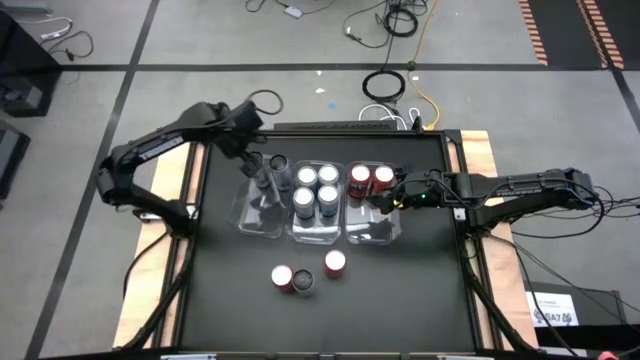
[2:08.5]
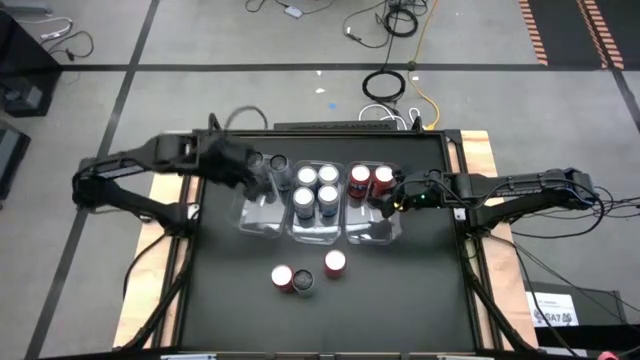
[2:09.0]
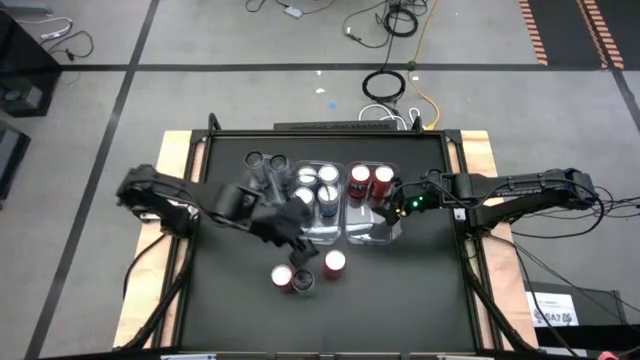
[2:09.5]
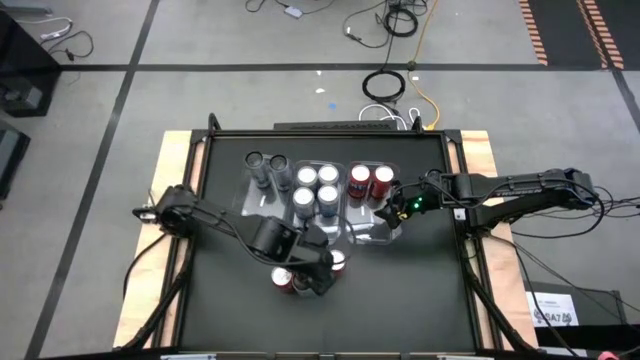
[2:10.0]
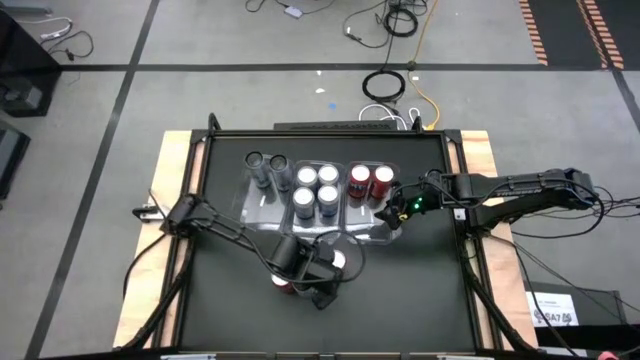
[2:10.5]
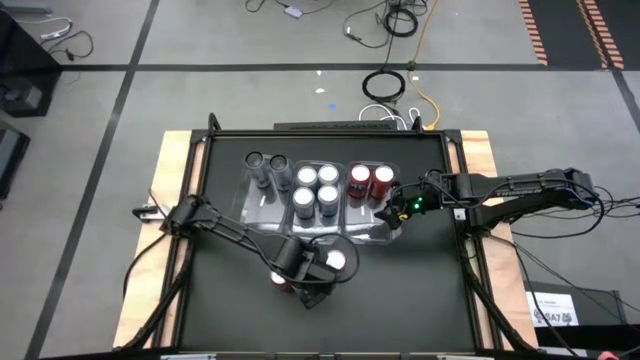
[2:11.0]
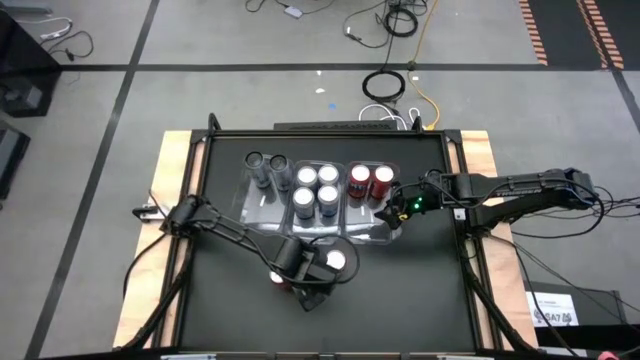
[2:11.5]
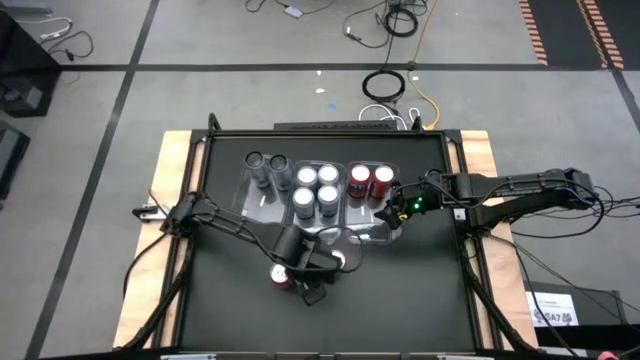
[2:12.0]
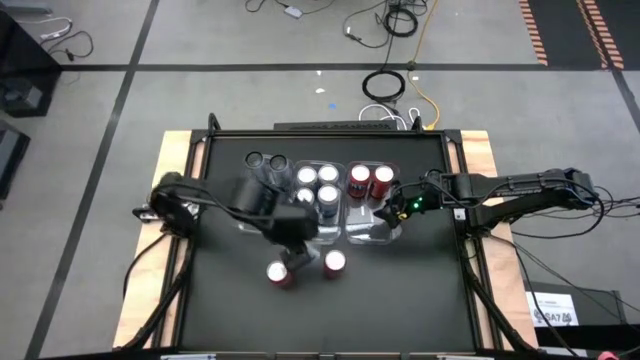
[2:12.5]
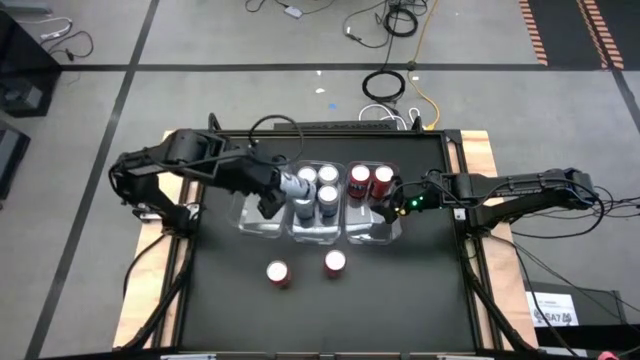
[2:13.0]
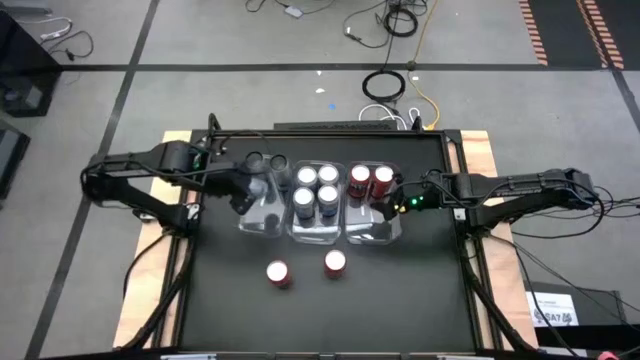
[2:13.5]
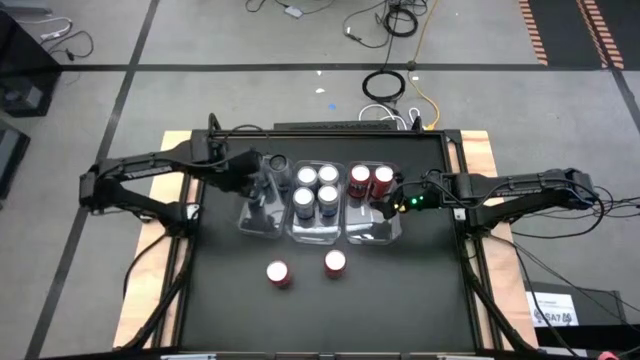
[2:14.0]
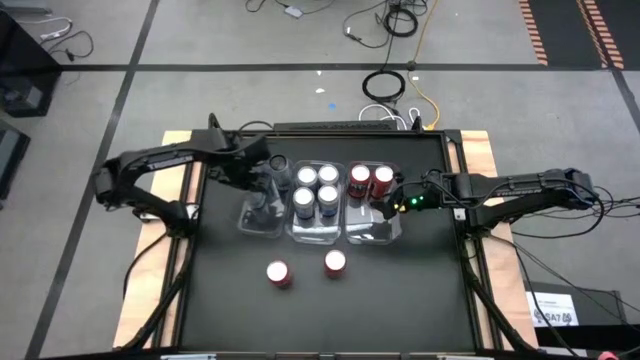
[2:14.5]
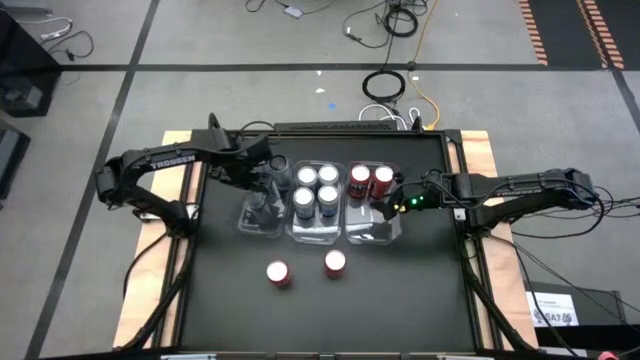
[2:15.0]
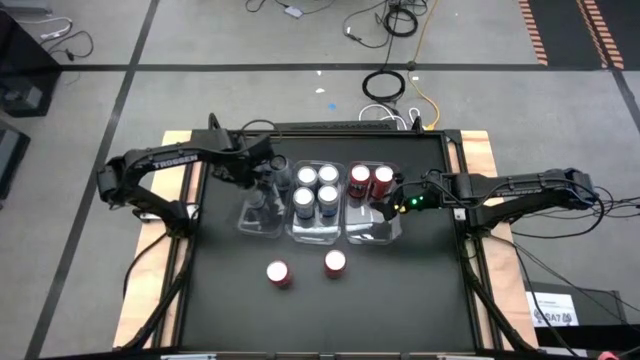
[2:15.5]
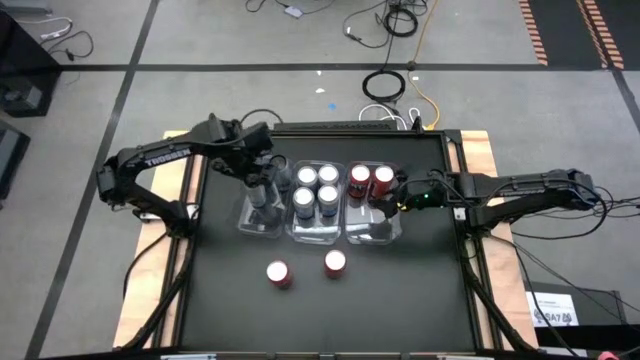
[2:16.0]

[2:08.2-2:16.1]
Task: Sort soda cans
Put the bottom white-blue soda can into the left transparent bin

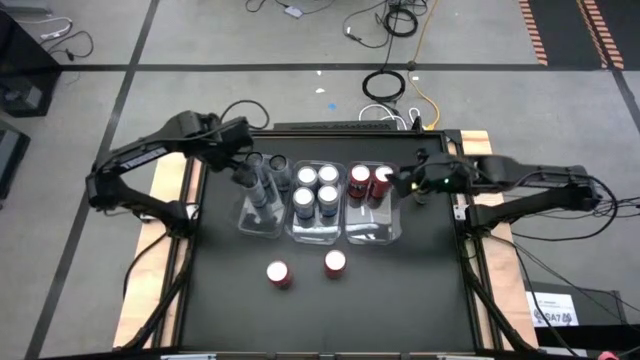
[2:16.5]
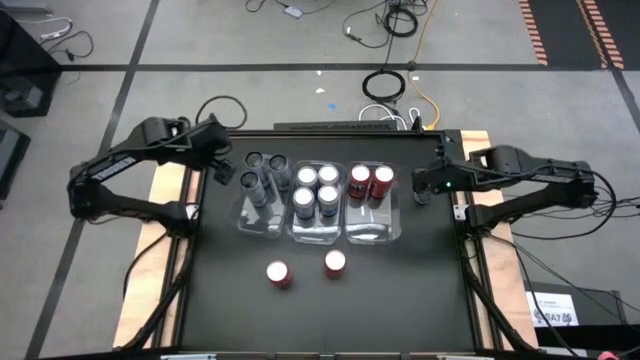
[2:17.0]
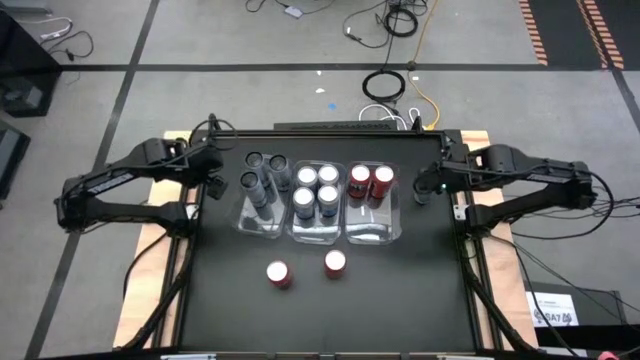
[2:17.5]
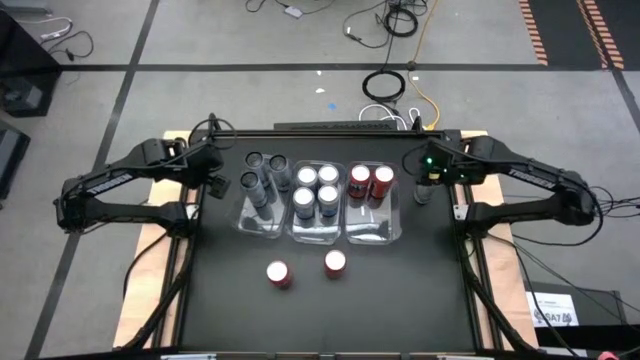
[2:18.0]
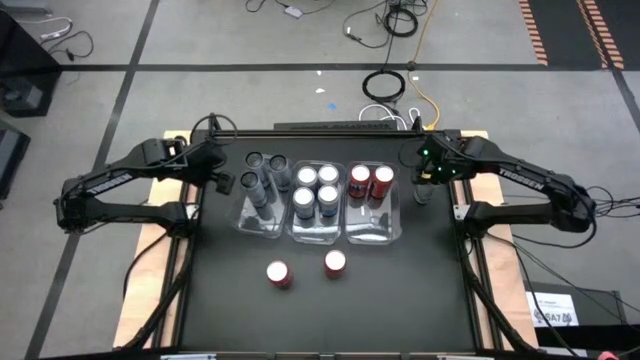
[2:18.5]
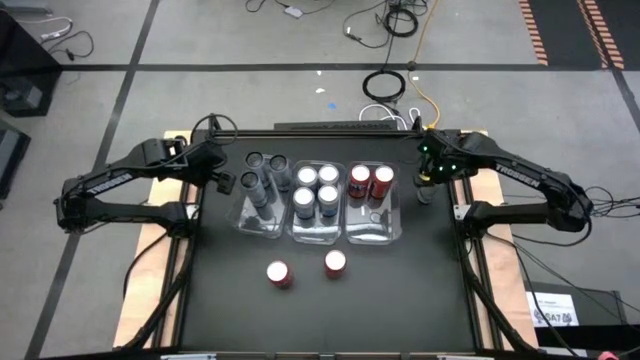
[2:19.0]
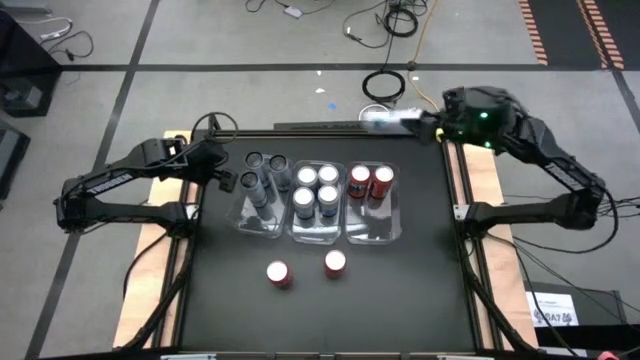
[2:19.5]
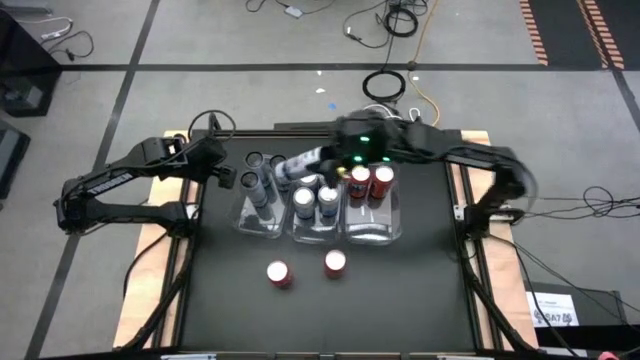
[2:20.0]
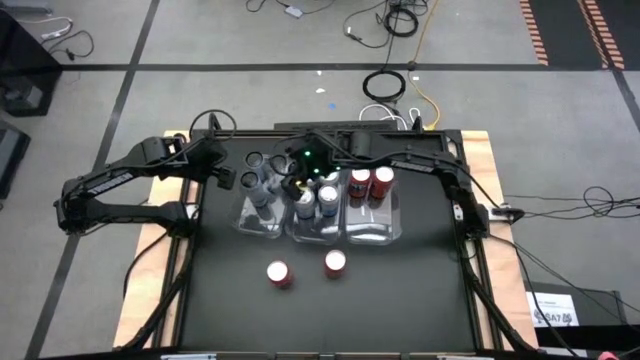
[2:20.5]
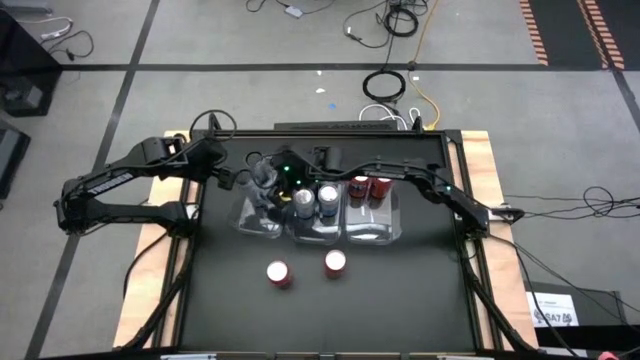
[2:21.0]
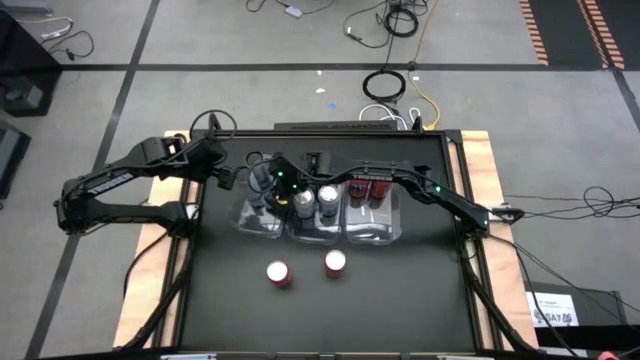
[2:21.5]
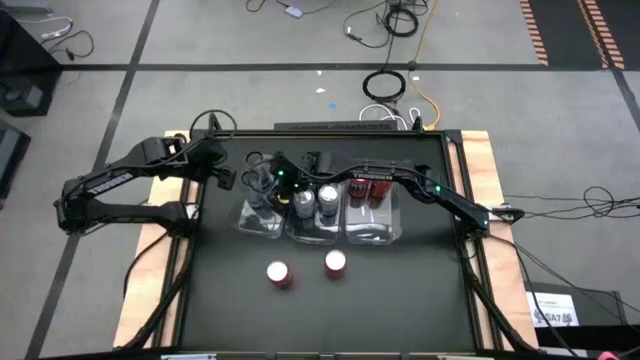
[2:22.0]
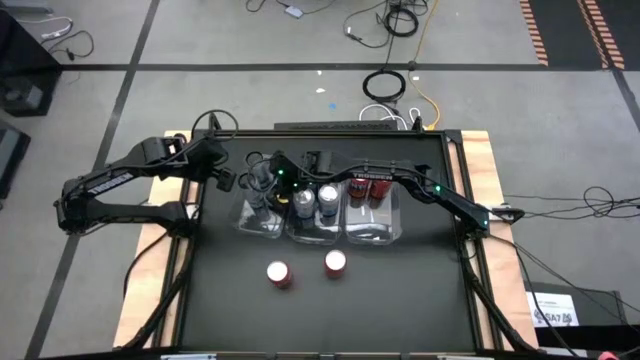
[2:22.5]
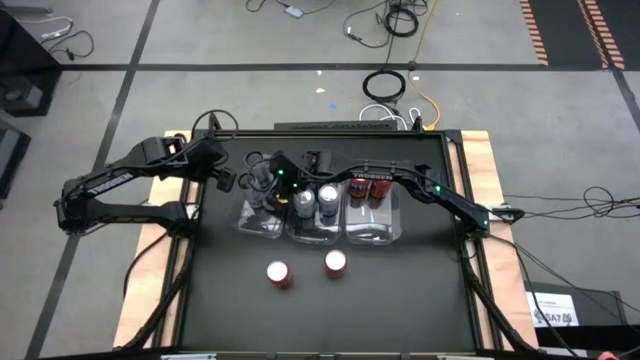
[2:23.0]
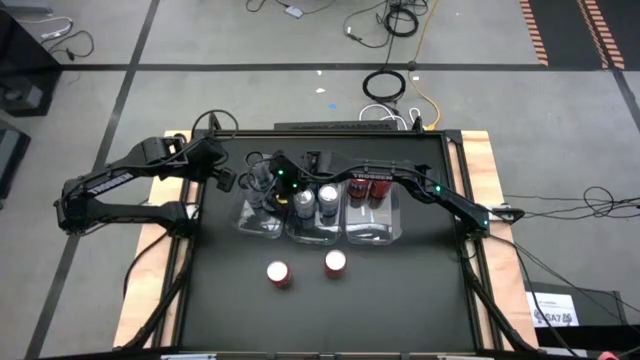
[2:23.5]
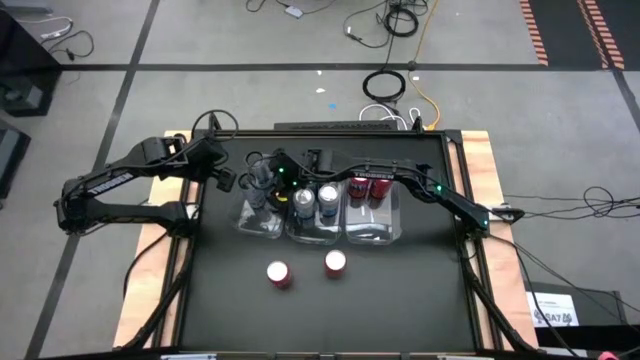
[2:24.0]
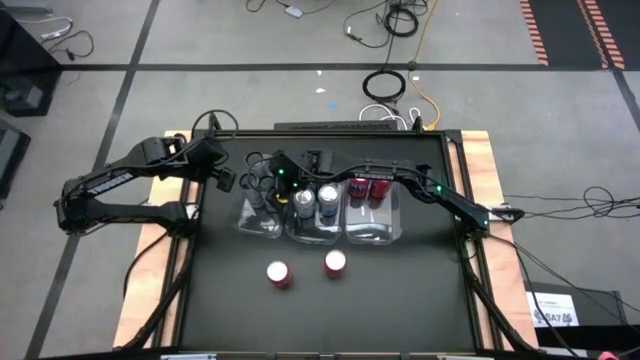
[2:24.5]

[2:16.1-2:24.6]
Put the white-blue soda can into the left transparent bin

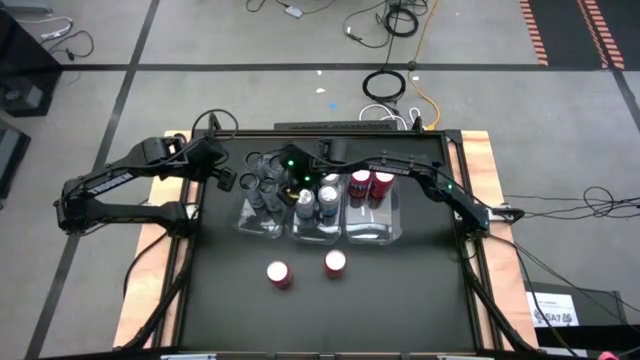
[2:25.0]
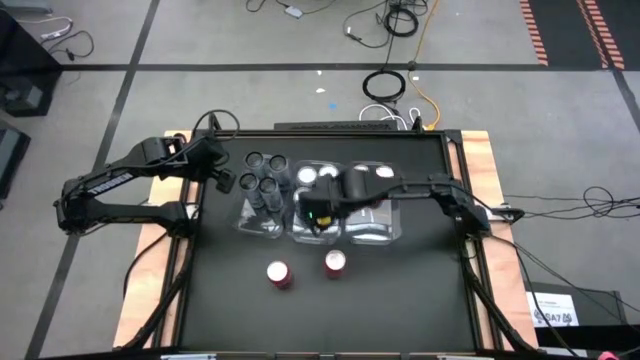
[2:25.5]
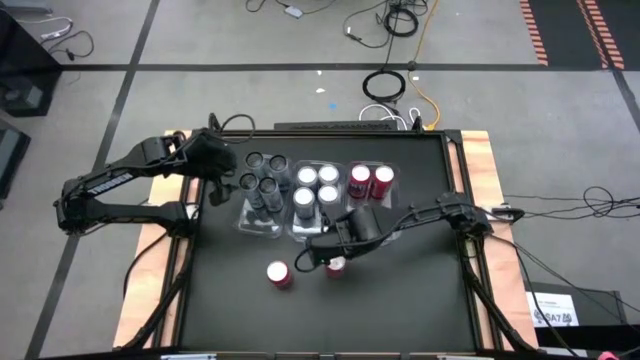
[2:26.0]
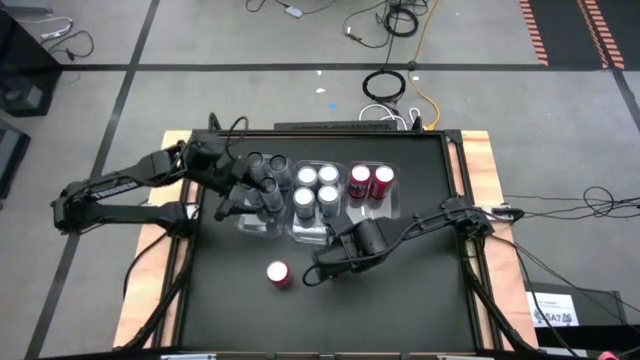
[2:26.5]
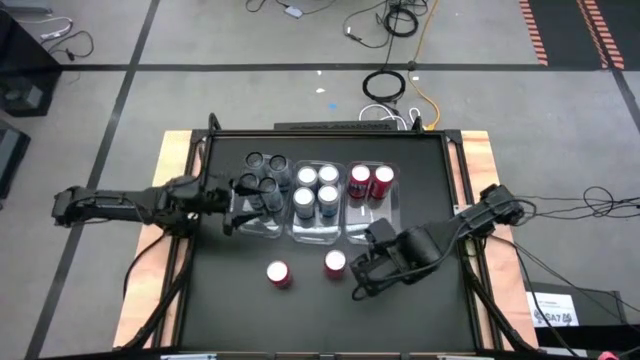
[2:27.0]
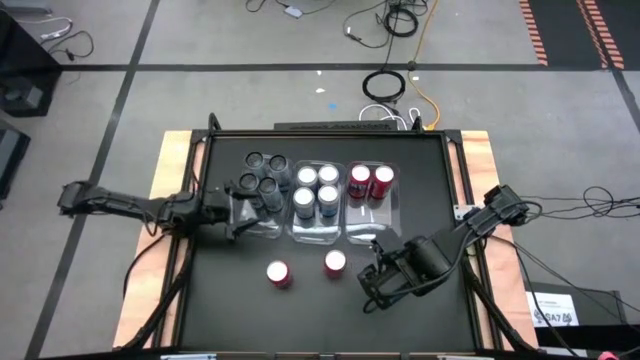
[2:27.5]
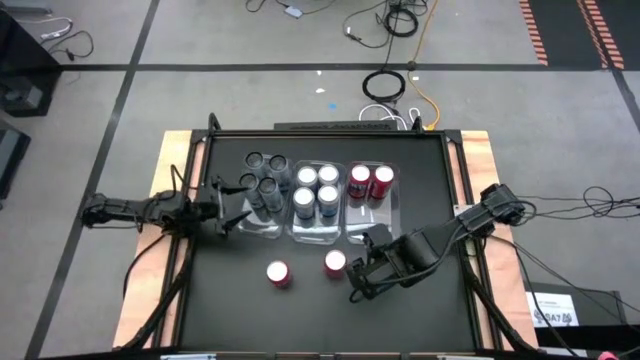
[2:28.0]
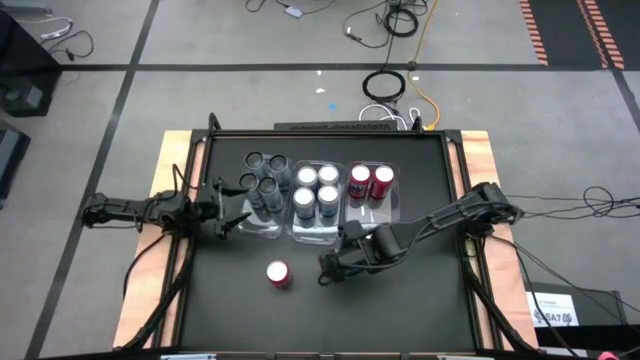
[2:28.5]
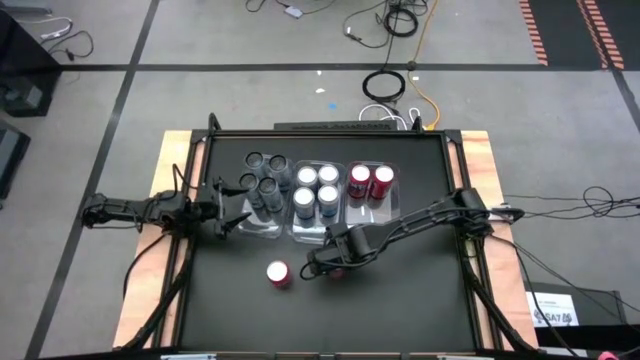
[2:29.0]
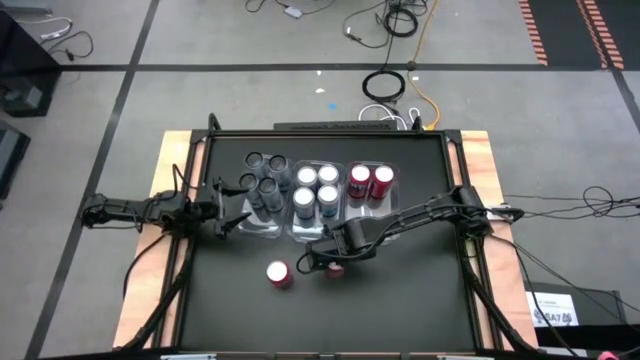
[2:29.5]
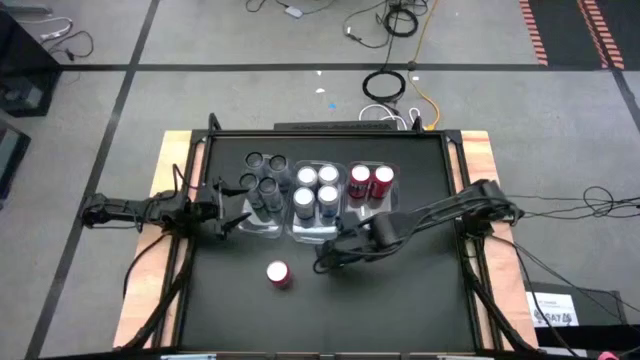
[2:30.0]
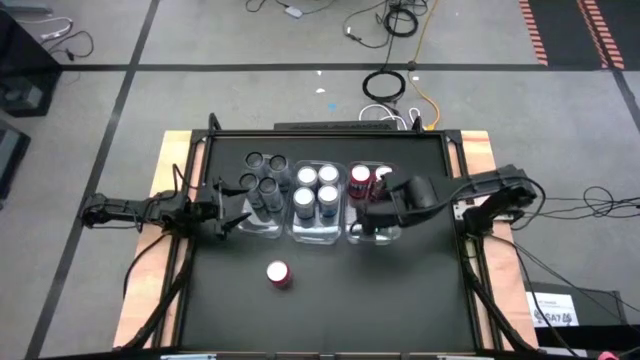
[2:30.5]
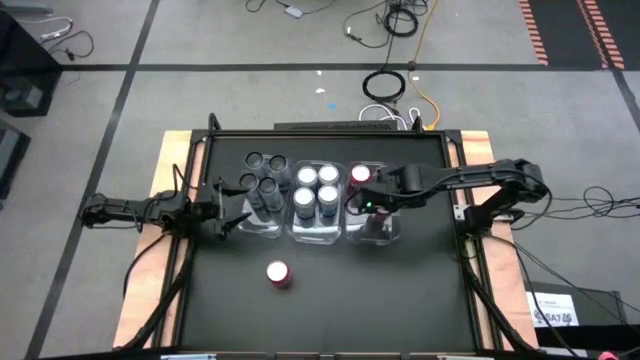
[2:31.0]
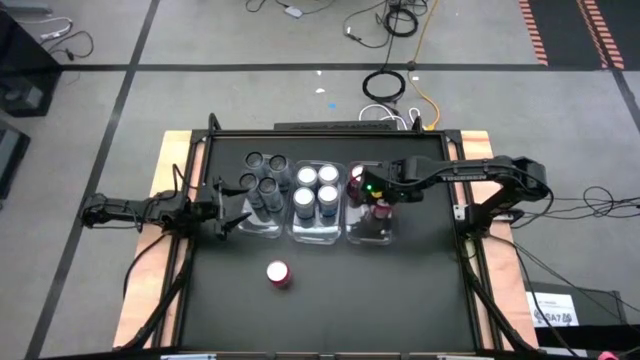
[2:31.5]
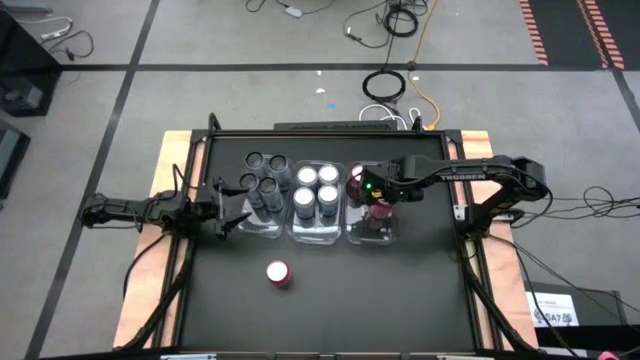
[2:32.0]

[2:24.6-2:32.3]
Put the right red soda can into the right transparent bin
